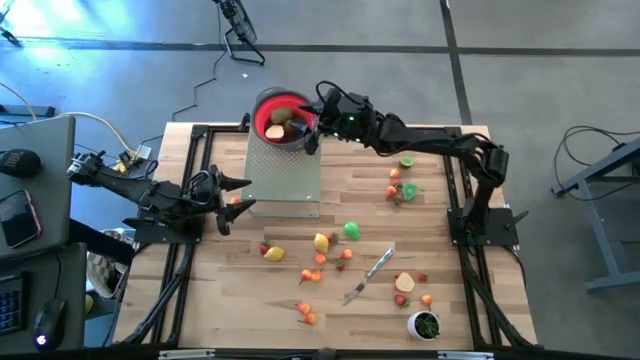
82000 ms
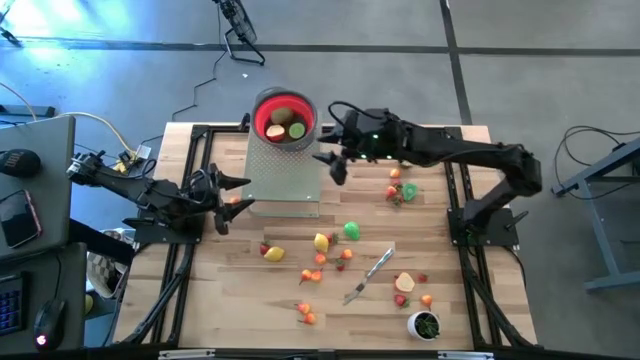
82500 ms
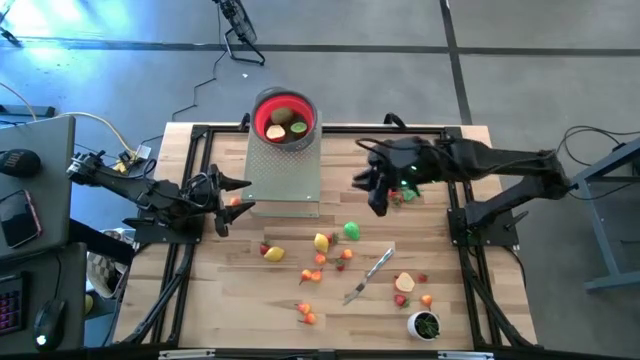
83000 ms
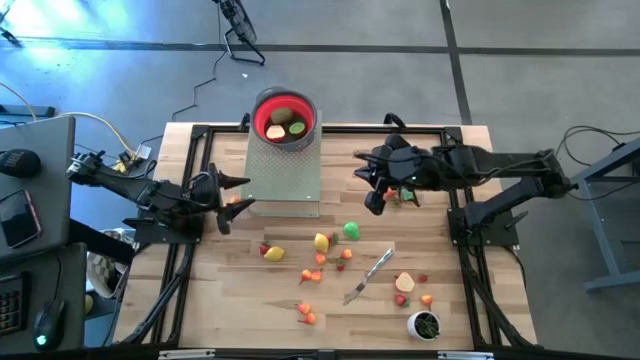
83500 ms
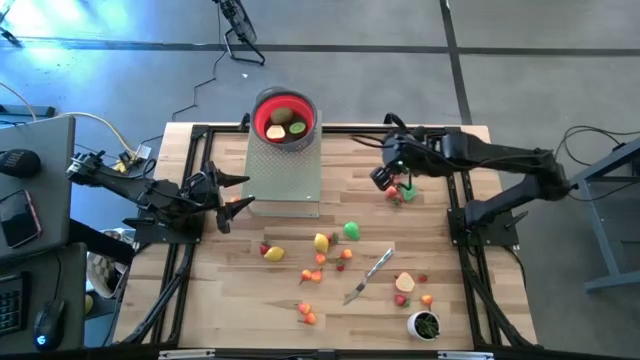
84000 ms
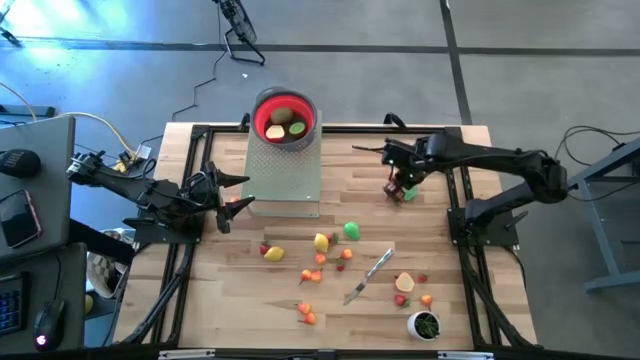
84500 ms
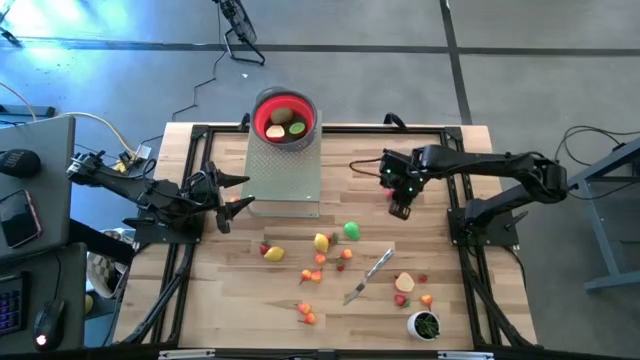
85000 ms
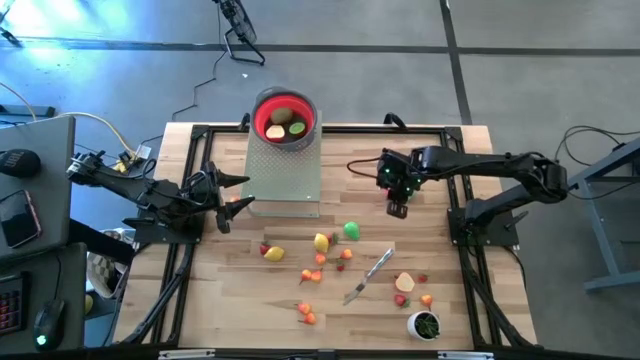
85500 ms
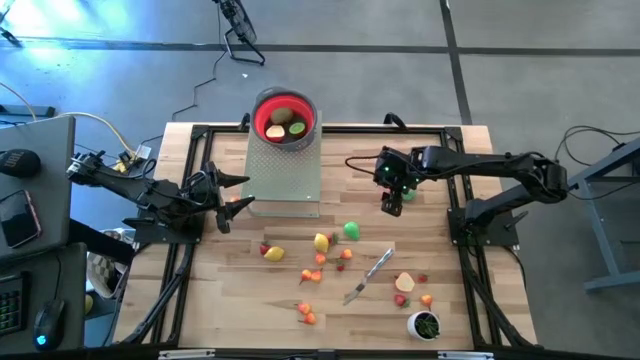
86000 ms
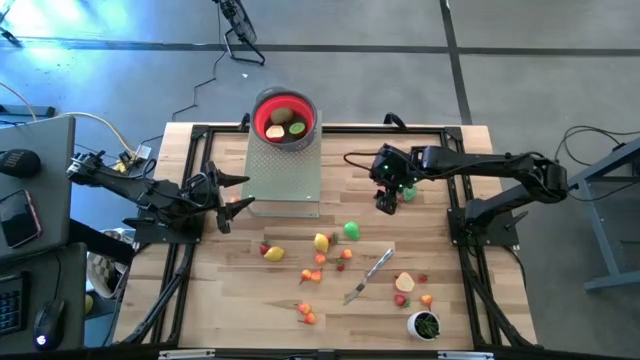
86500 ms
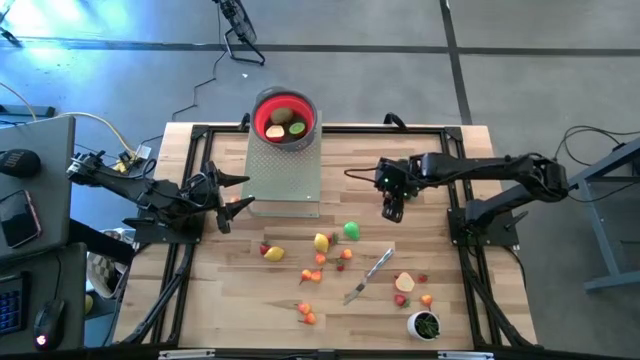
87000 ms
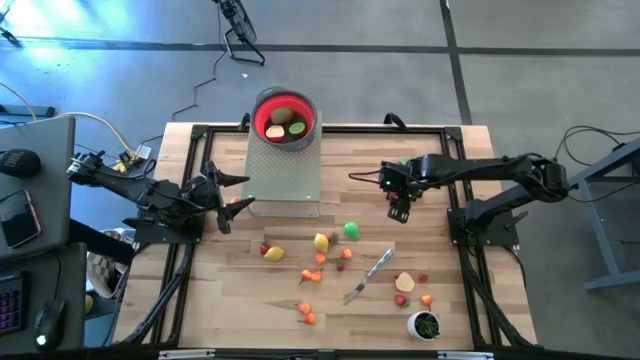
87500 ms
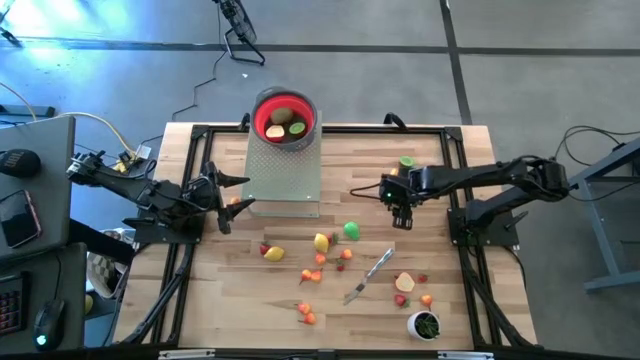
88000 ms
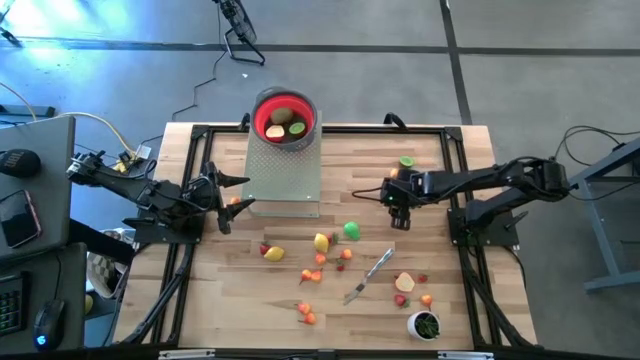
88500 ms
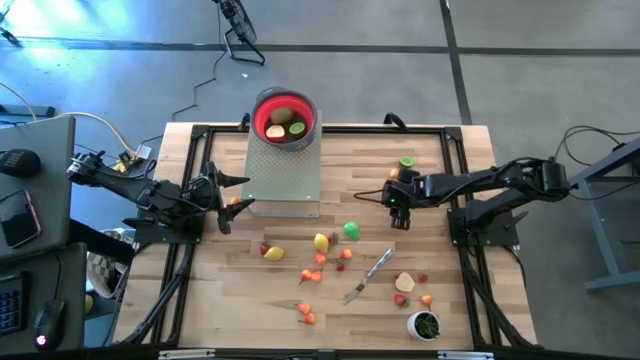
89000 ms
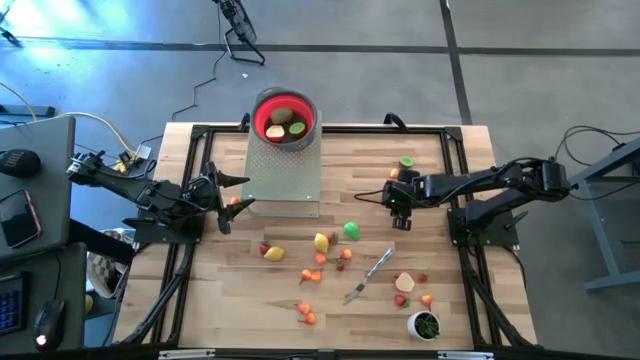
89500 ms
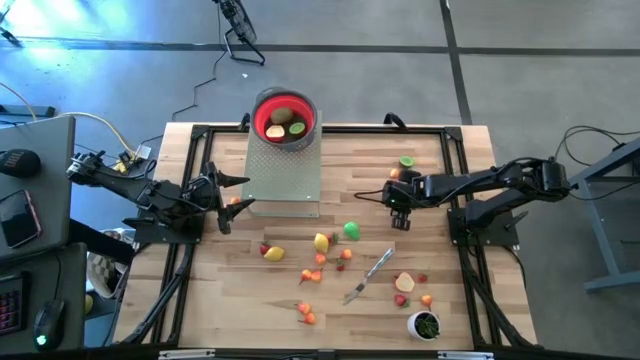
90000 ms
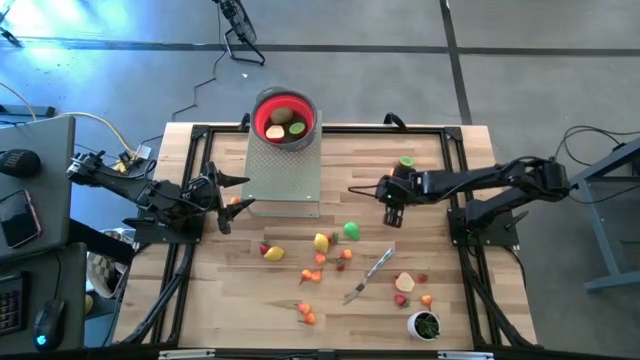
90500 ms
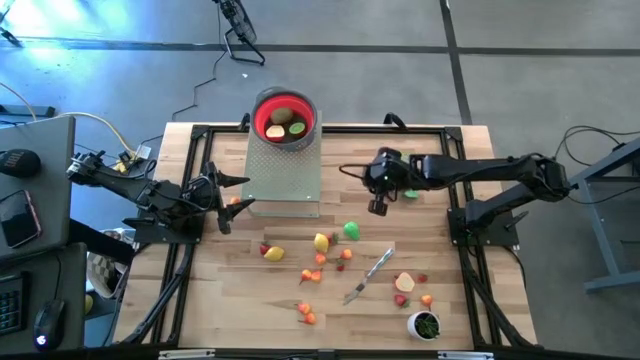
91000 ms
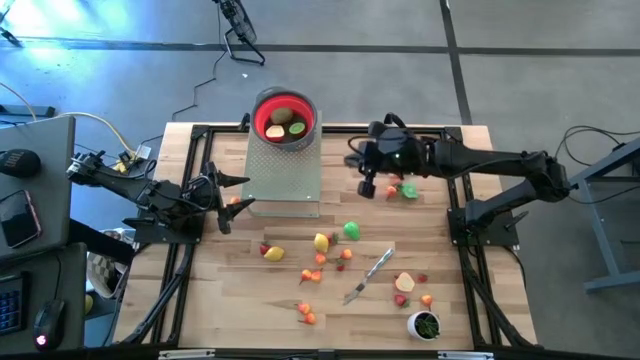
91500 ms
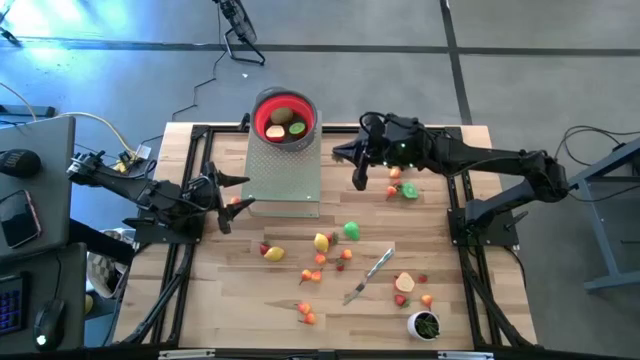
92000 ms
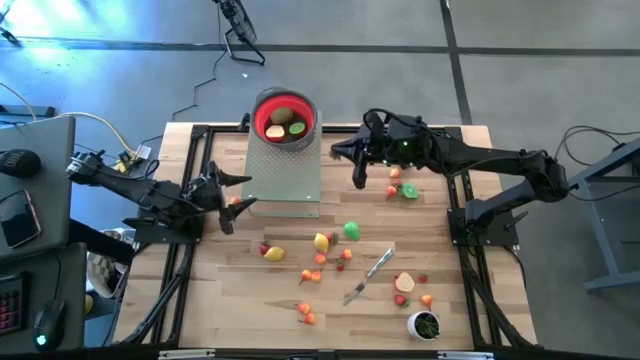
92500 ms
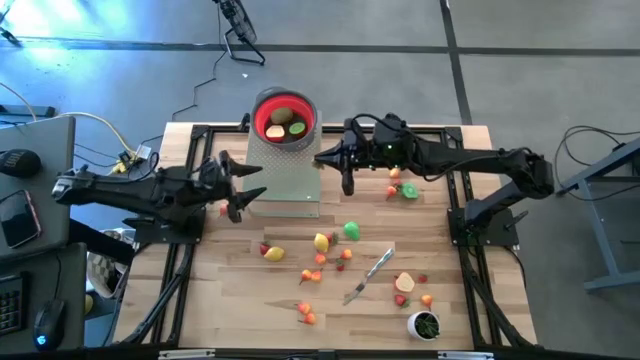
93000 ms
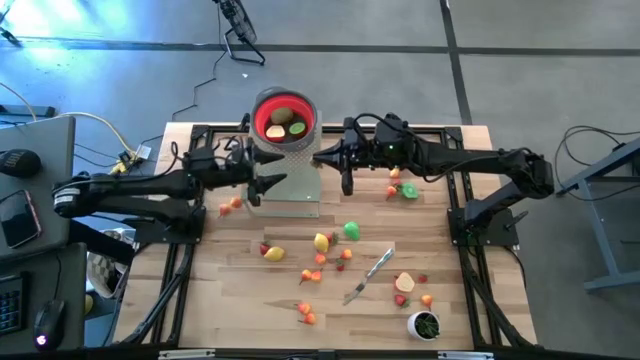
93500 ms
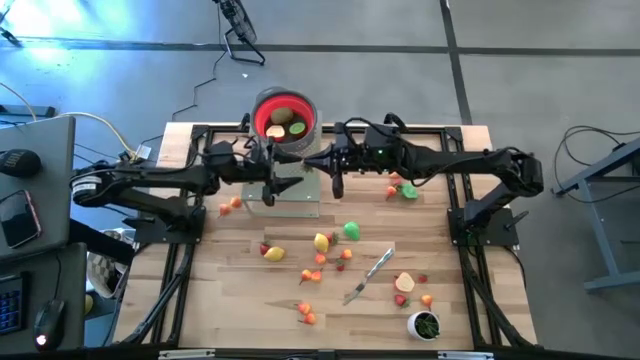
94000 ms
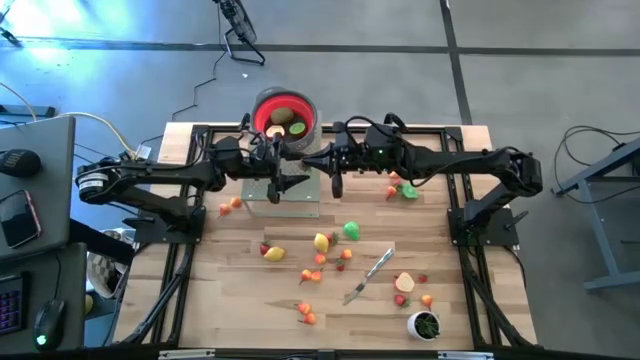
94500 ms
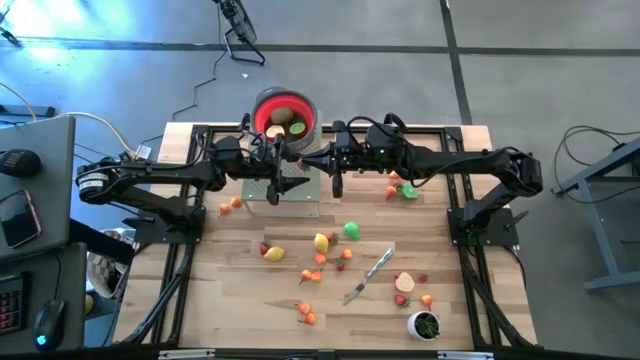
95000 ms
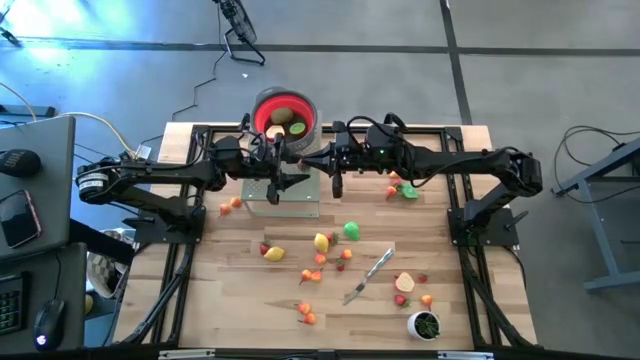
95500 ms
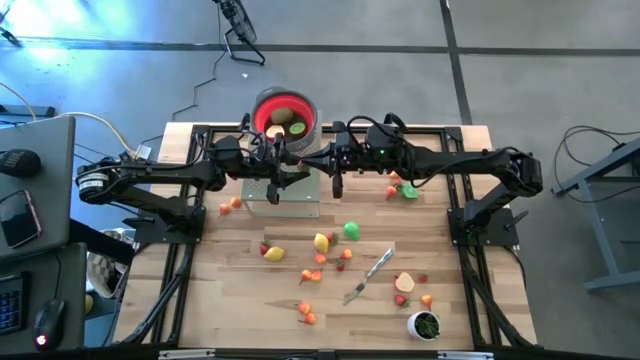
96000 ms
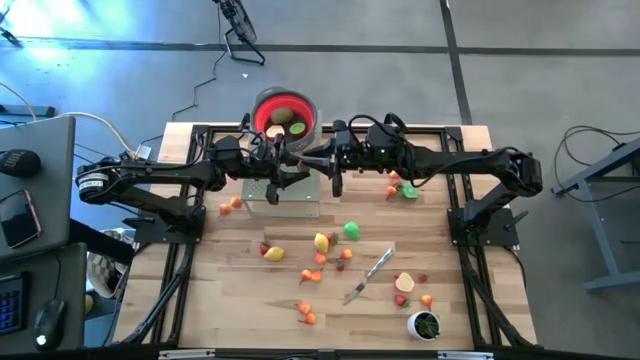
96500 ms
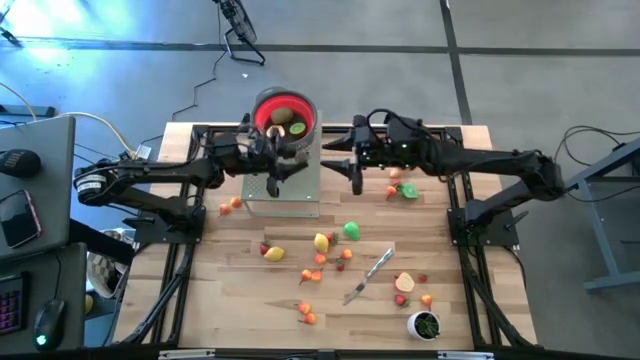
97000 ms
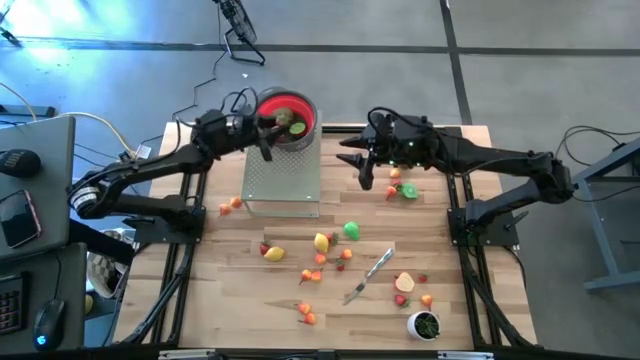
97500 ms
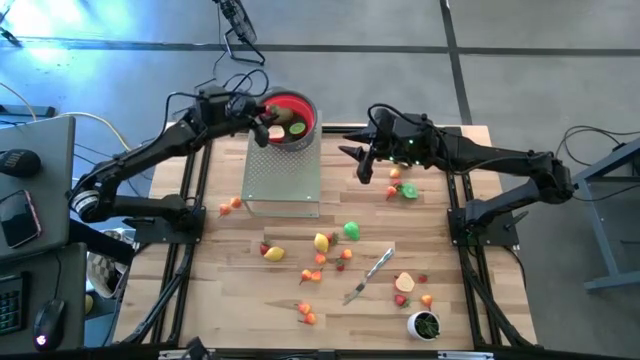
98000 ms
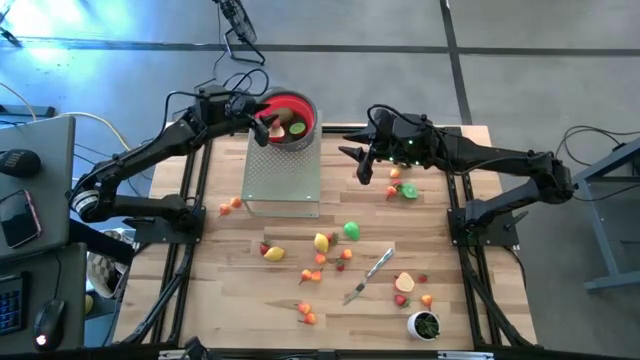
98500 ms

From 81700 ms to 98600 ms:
Task: Pick & Place Fruit
Put the strawberry into the red strainer on the shelf

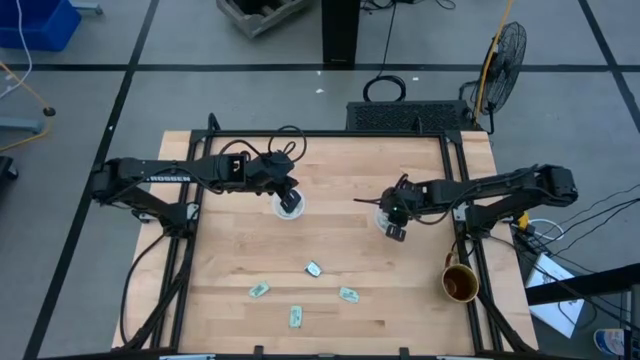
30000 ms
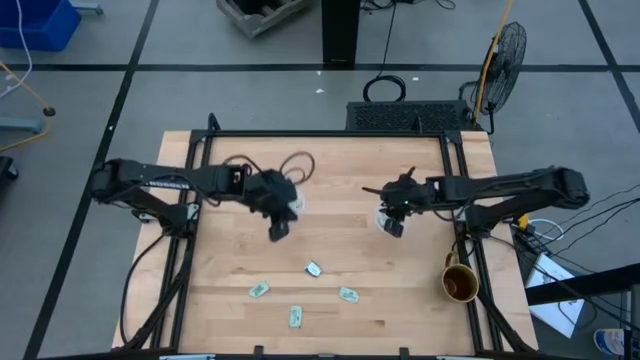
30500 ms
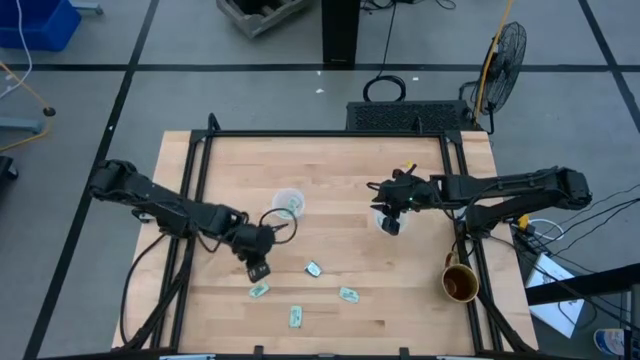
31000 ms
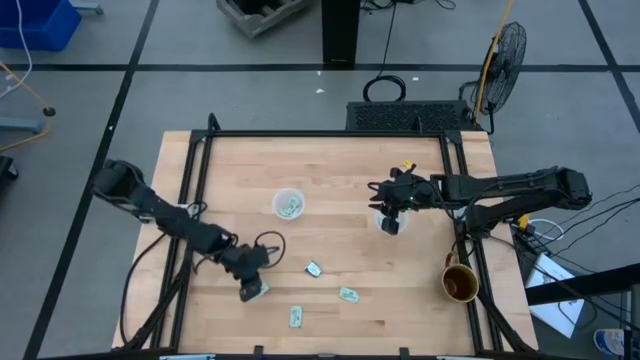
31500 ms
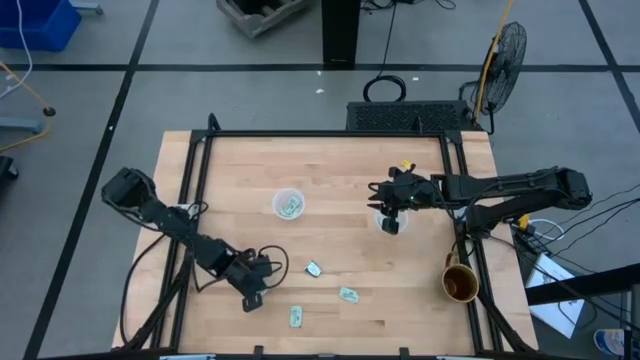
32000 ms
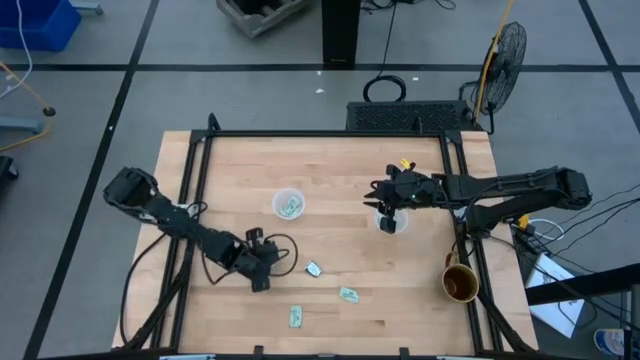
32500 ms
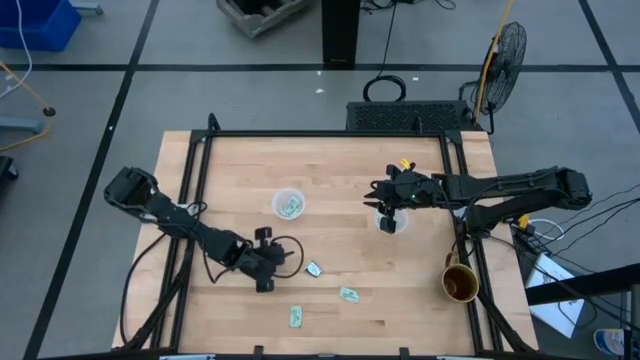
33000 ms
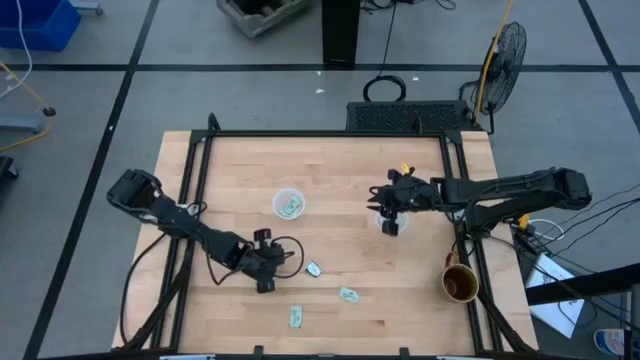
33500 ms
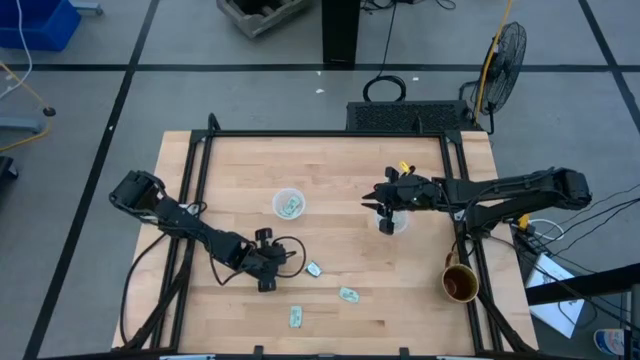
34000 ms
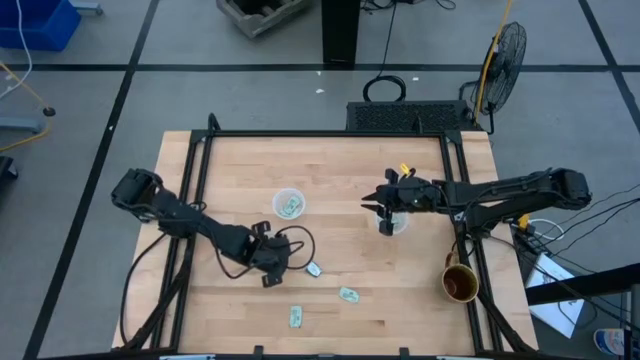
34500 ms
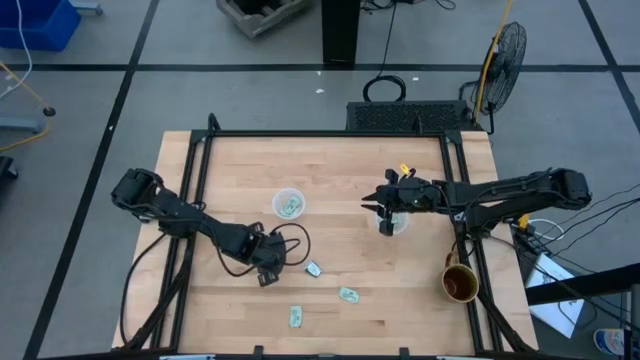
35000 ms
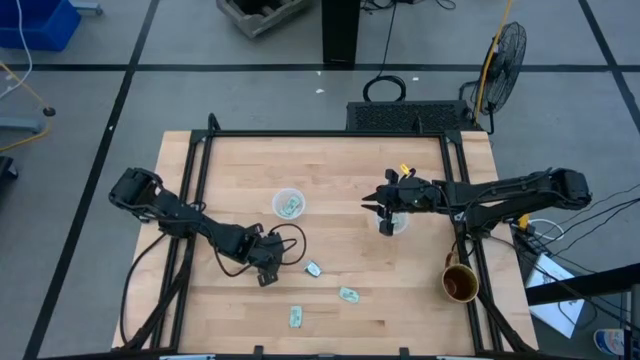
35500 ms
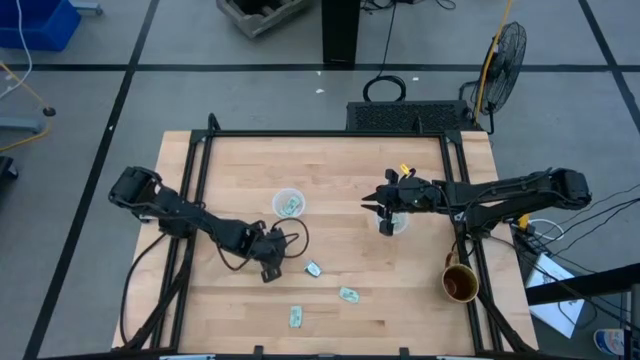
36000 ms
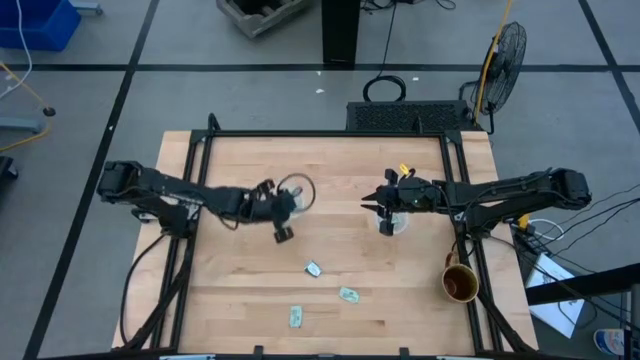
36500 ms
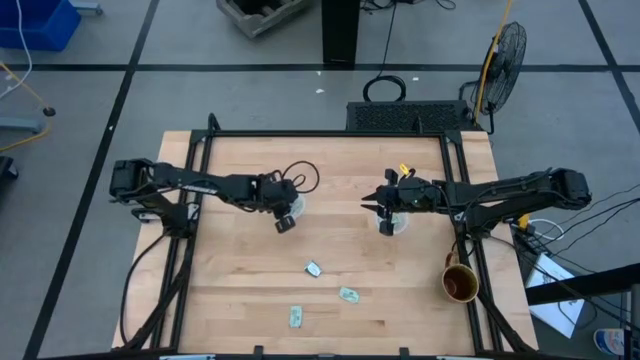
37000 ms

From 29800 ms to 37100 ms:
Task: Pick and place Stevia / Truvia into bins
Put the stevia packet into the left container
